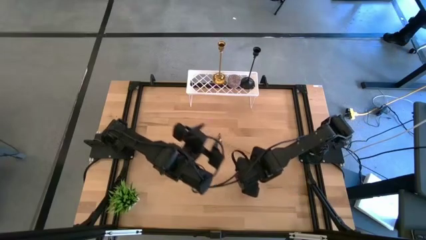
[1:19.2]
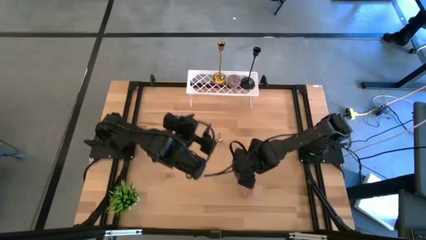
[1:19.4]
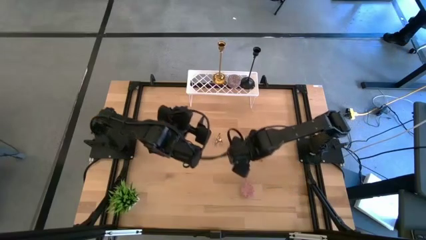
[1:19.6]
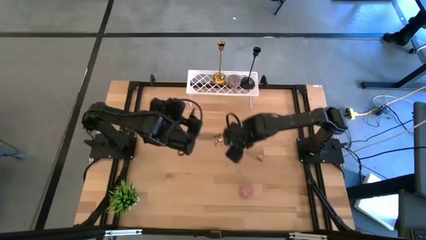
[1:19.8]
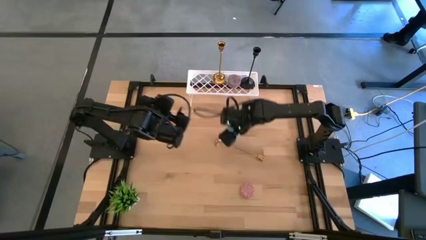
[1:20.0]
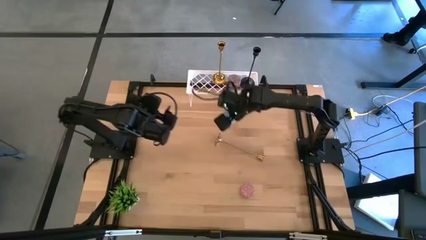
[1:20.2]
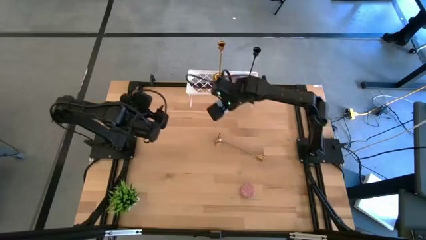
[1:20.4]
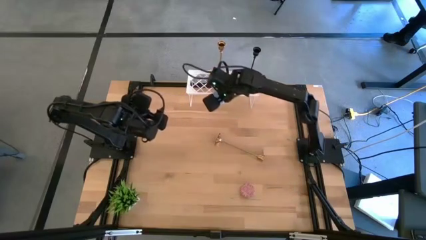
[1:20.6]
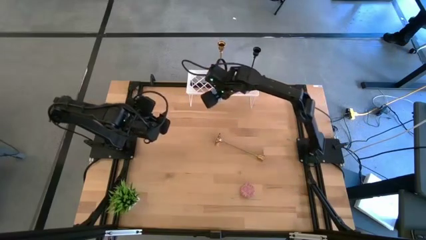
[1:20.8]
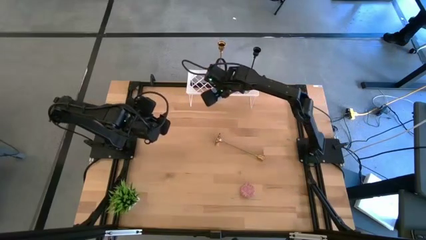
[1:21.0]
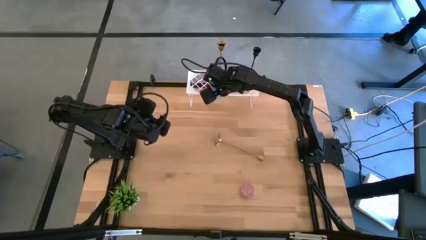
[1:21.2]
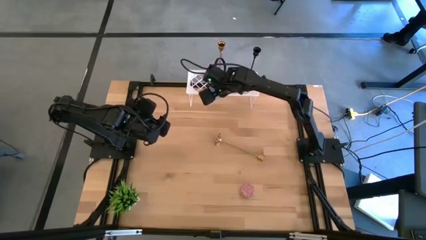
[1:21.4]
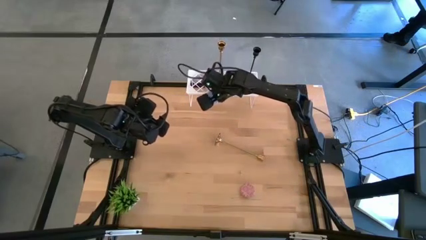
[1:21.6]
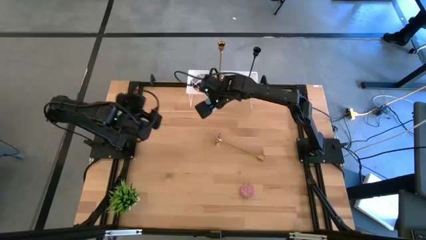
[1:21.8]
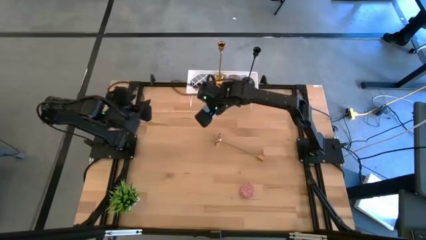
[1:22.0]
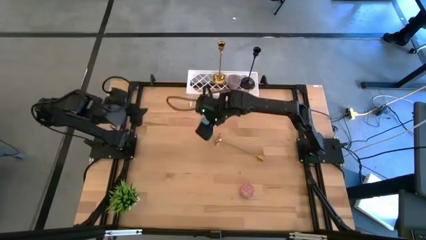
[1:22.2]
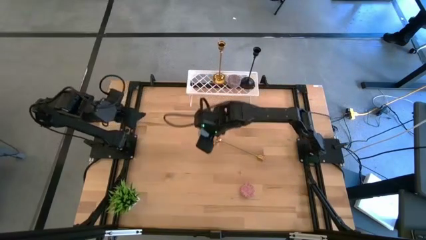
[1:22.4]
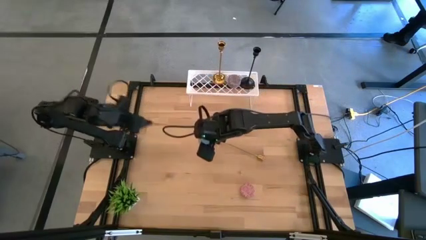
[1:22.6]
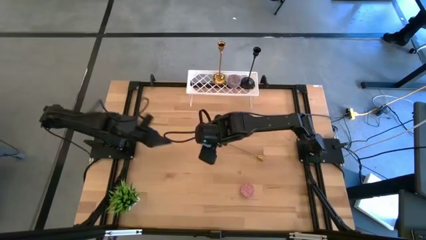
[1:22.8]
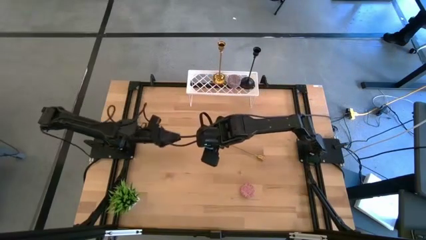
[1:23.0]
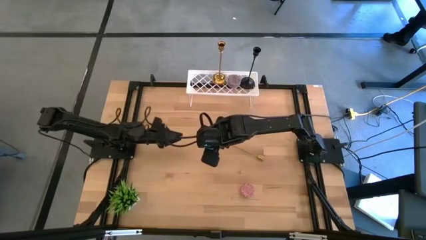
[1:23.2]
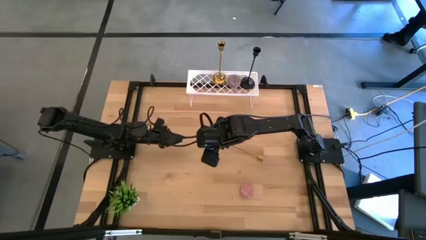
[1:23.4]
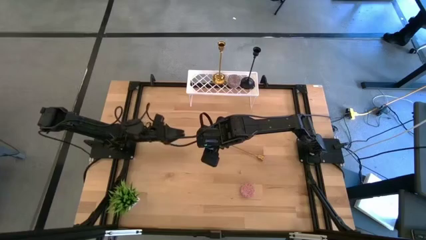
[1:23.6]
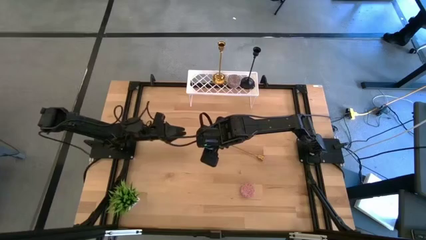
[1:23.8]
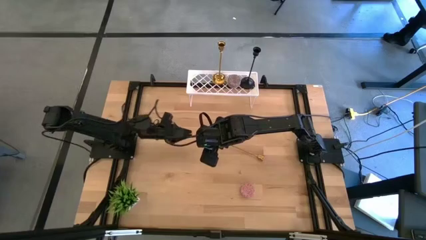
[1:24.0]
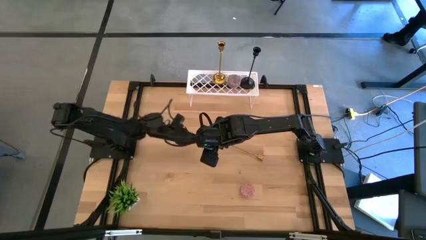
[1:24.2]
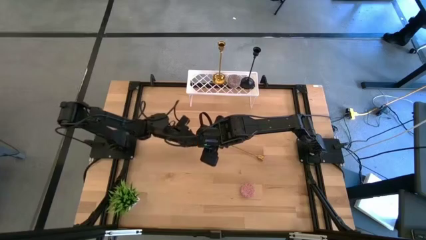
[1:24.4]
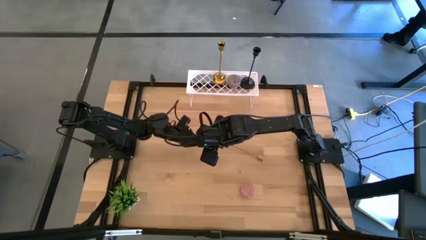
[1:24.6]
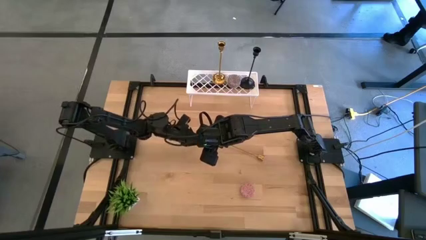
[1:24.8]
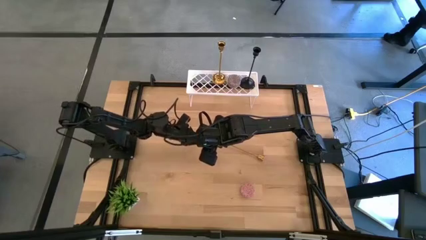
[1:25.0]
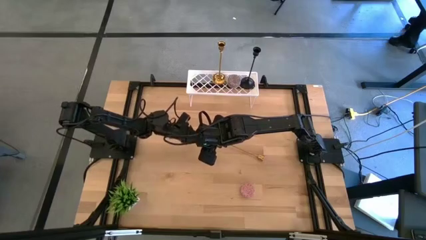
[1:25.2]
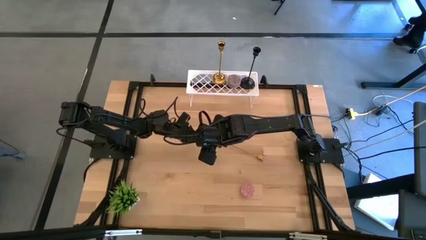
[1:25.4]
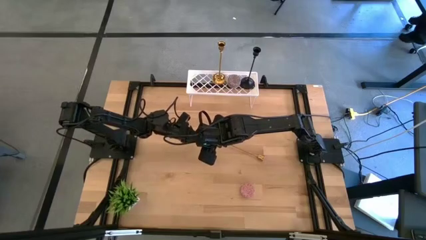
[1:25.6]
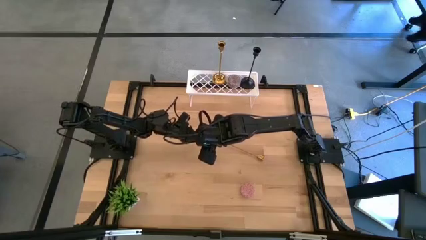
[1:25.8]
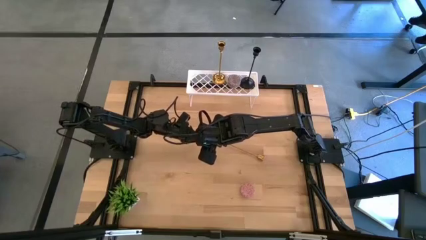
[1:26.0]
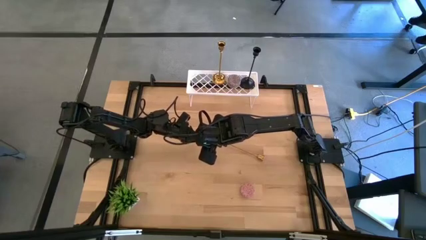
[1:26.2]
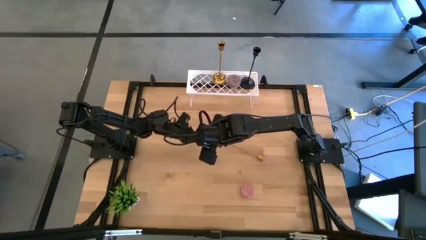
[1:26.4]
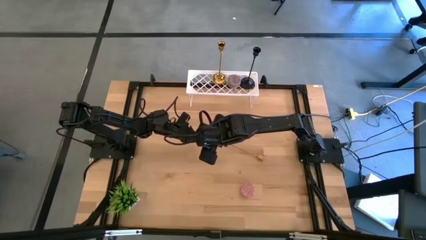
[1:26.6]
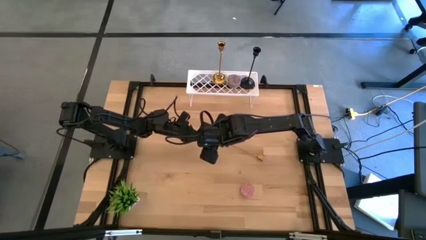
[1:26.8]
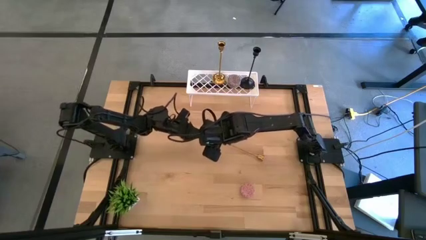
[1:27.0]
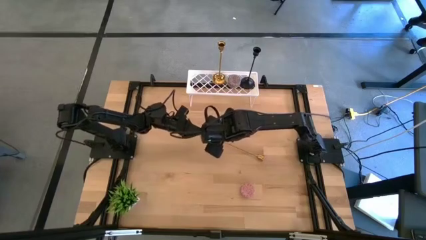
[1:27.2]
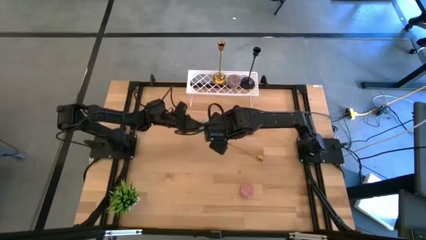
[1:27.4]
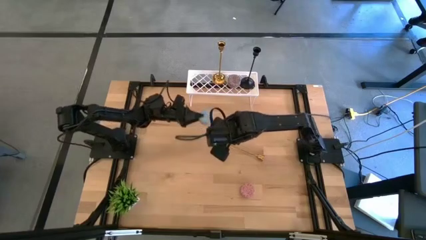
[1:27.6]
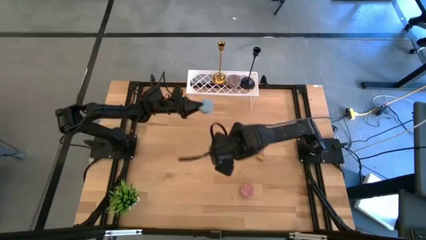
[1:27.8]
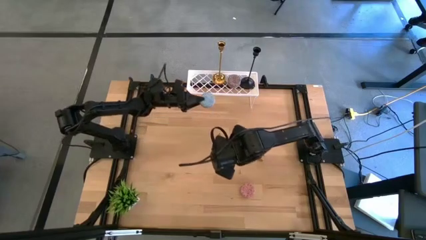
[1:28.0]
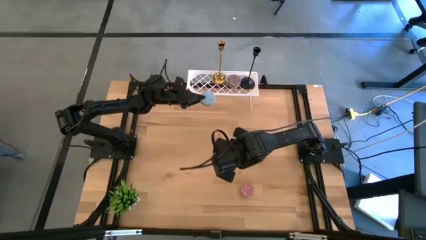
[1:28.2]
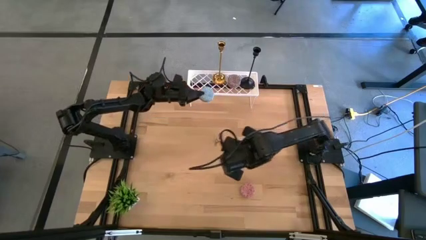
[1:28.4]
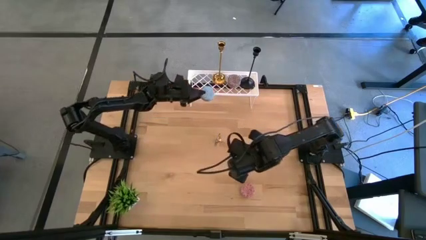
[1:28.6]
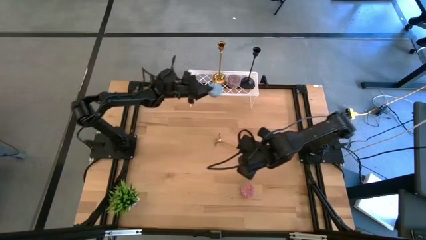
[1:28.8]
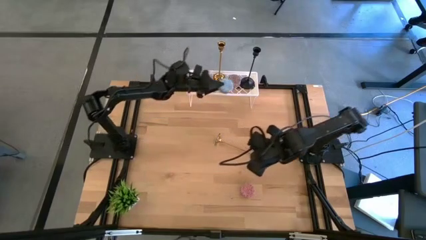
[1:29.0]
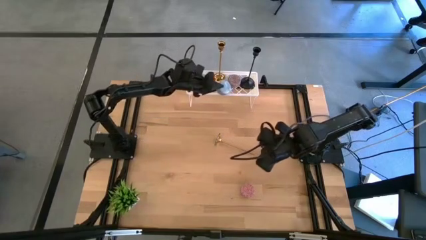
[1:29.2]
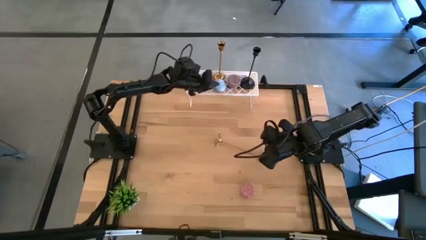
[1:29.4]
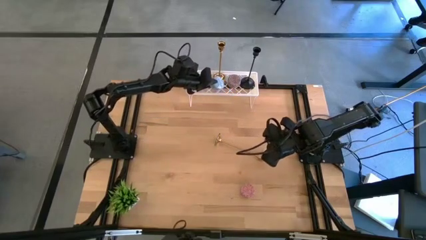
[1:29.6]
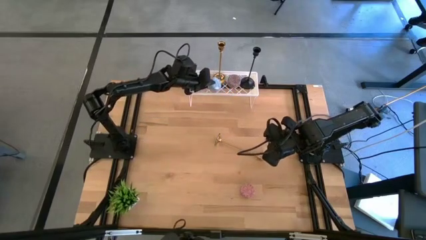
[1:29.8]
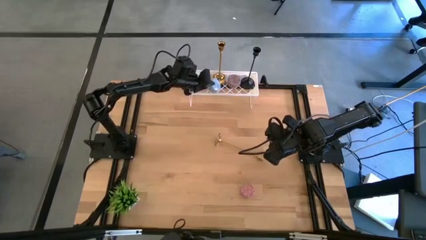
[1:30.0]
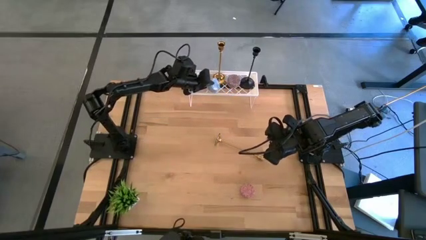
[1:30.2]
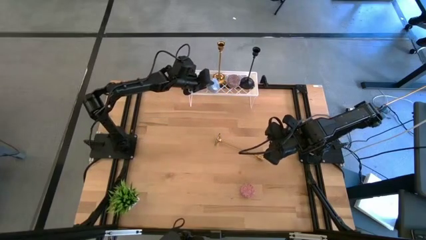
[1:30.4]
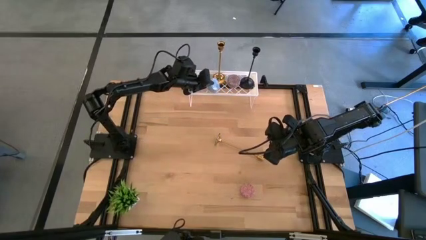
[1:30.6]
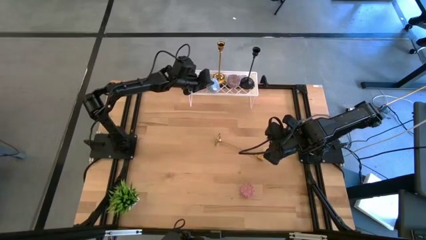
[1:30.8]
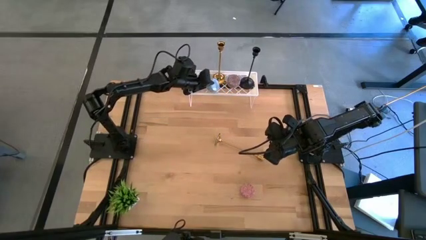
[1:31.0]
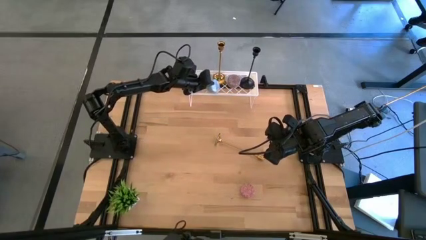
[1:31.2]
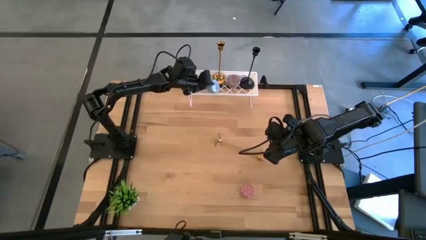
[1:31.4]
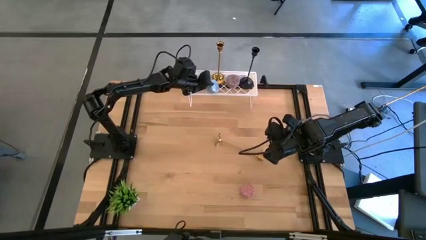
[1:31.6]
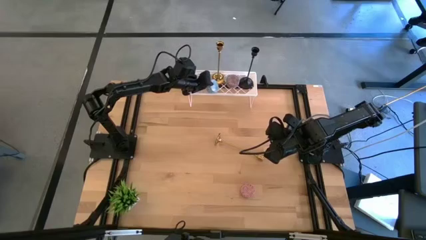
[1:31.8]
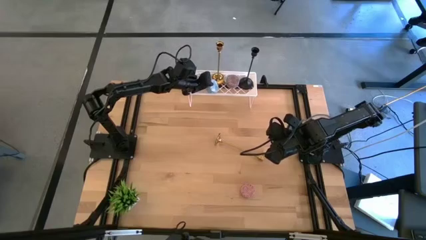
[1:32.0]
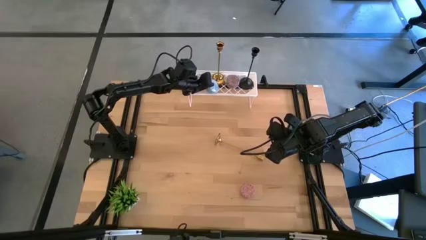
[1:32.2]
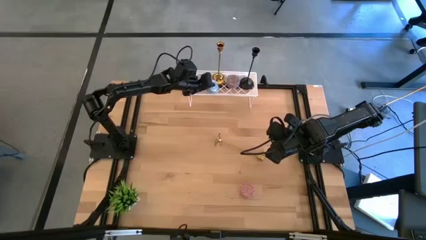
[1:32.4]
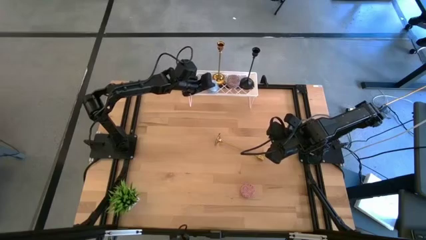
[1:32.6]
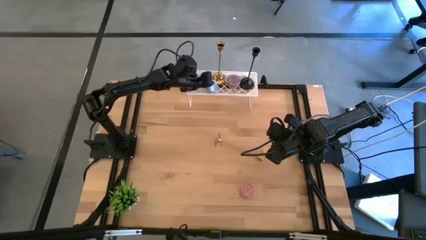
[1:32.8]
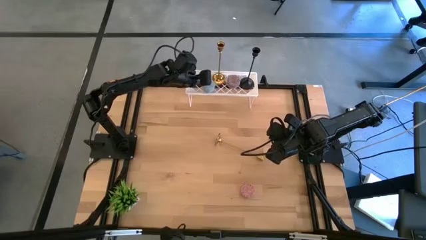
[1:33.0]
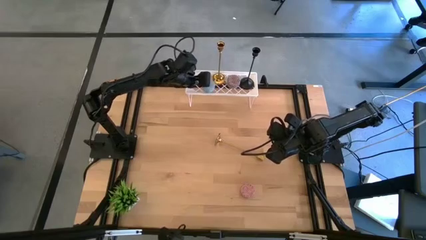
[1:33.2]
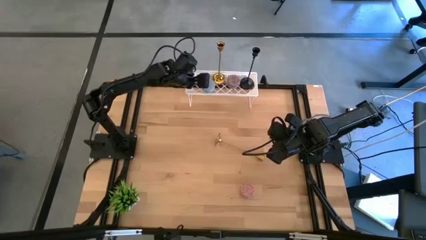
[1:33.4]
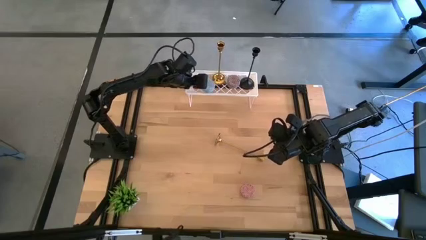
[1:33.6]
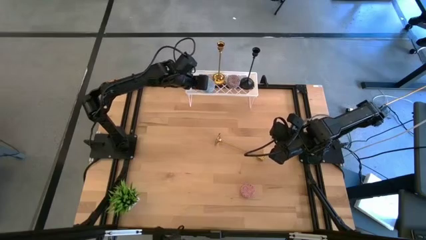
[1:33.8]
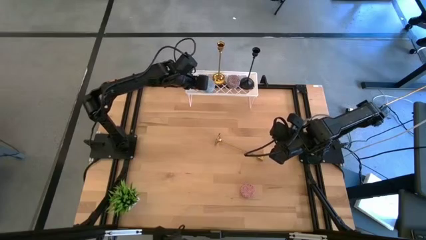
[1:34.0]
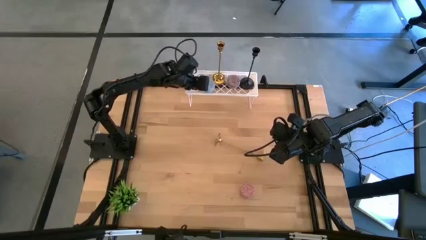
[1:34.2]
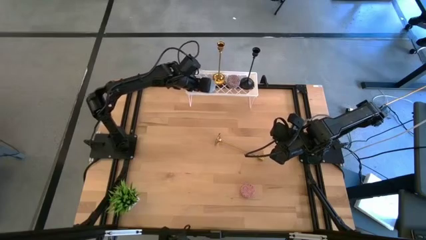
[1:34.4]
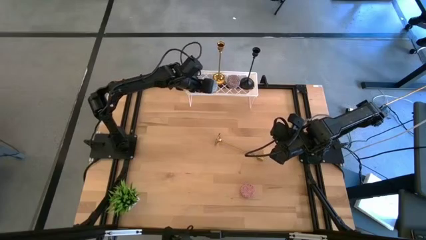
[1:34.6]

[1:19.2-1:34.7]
Task: Pick & Place candle stick holders
Put the blue scented candle on the shelf
